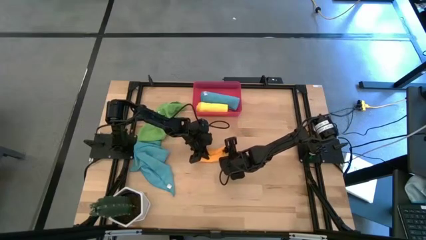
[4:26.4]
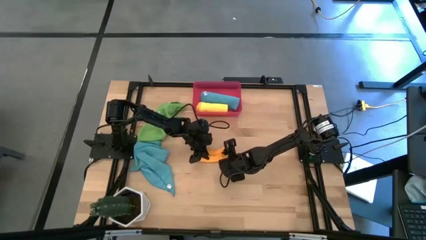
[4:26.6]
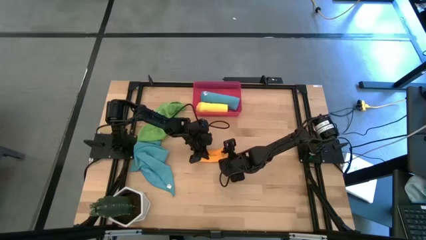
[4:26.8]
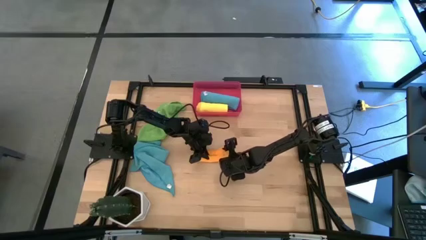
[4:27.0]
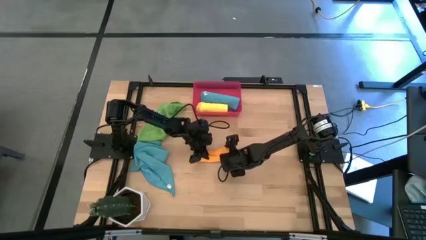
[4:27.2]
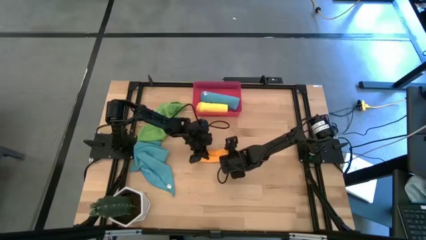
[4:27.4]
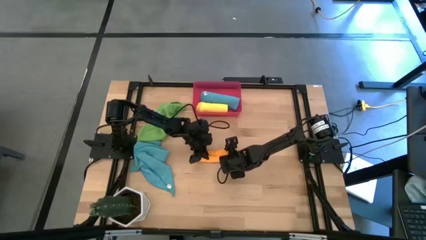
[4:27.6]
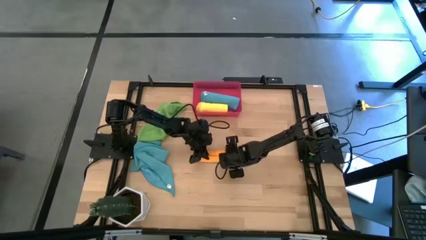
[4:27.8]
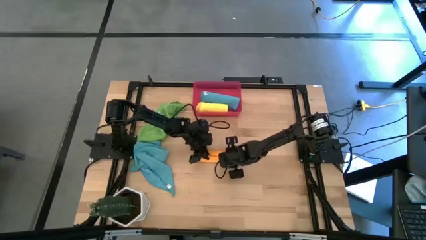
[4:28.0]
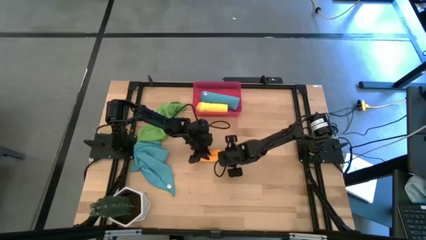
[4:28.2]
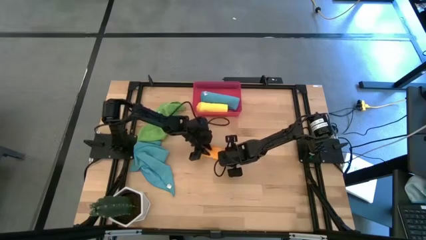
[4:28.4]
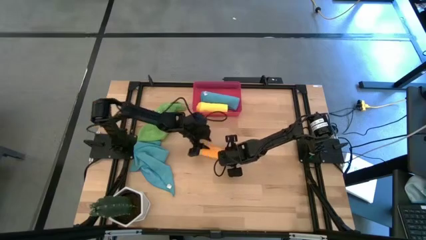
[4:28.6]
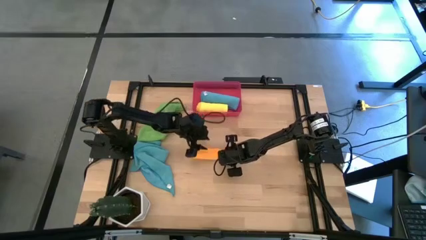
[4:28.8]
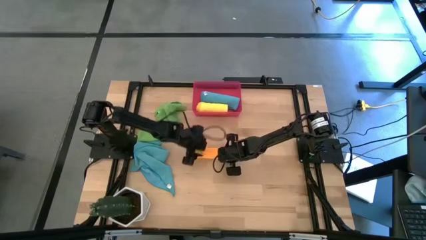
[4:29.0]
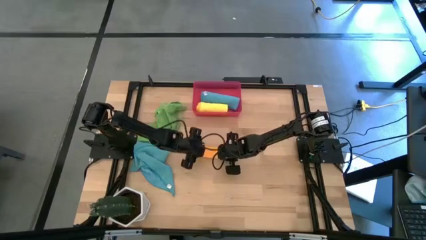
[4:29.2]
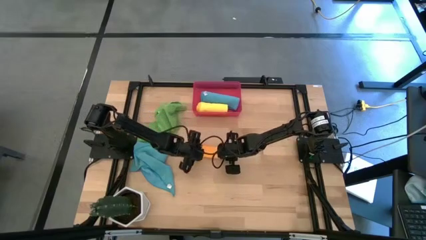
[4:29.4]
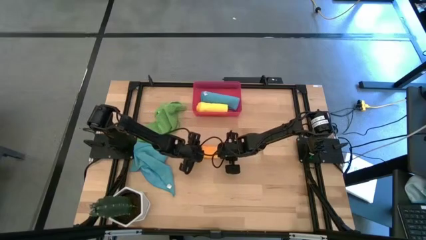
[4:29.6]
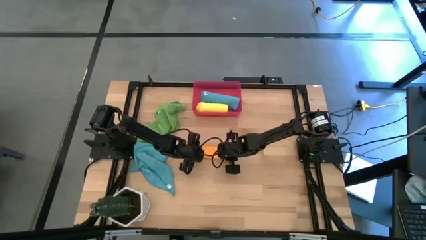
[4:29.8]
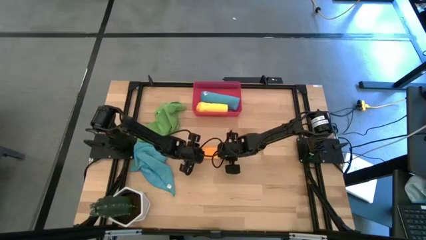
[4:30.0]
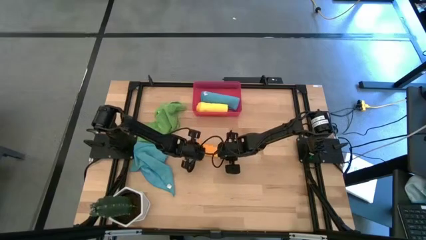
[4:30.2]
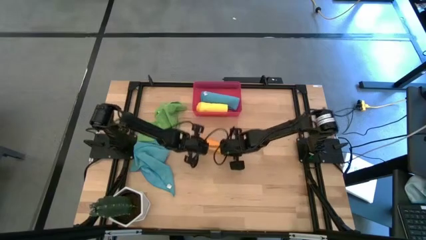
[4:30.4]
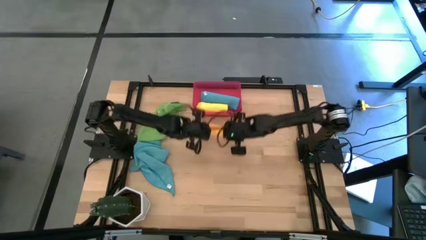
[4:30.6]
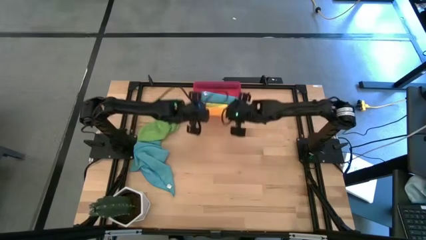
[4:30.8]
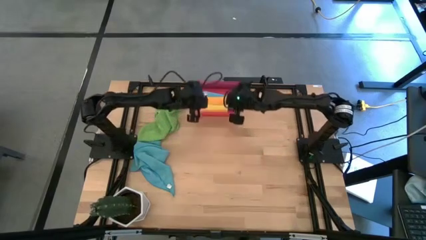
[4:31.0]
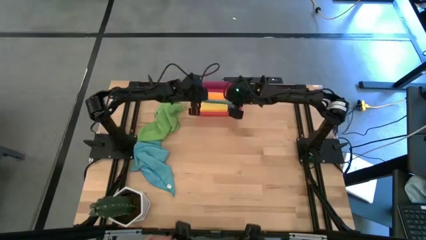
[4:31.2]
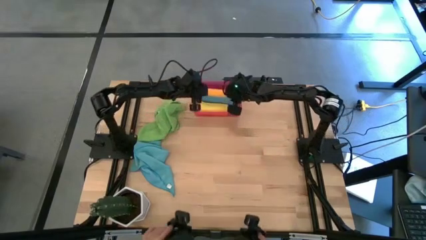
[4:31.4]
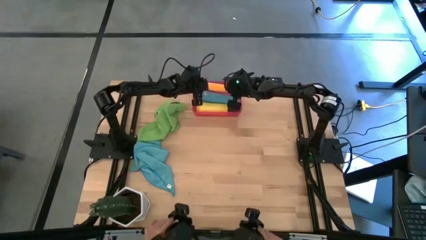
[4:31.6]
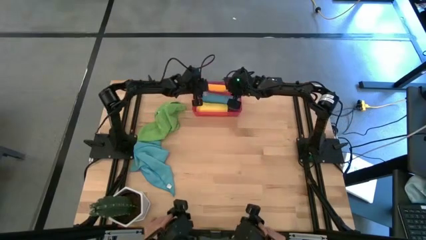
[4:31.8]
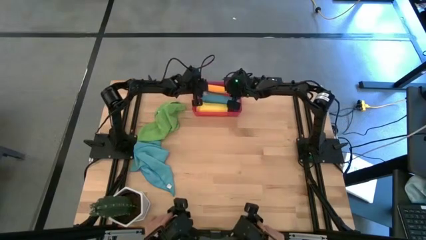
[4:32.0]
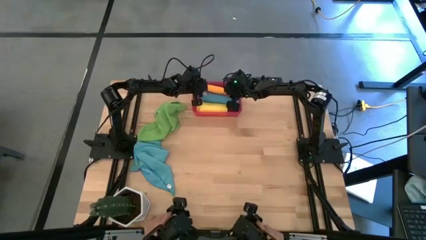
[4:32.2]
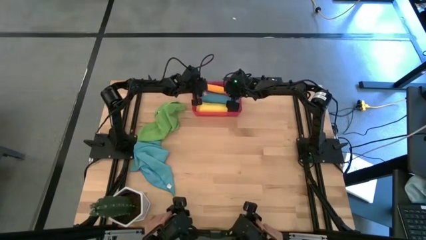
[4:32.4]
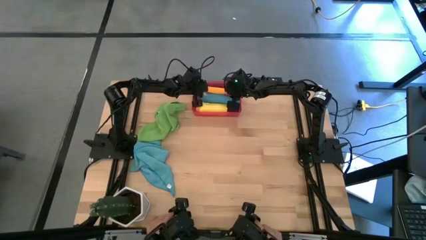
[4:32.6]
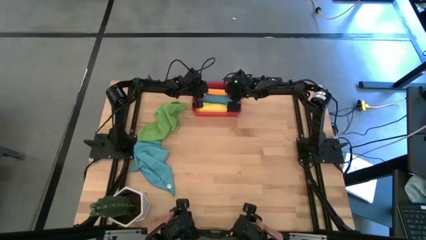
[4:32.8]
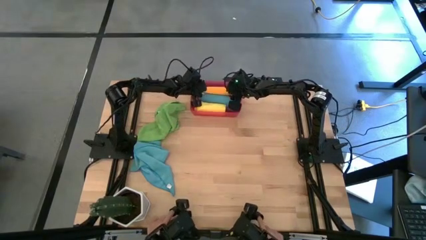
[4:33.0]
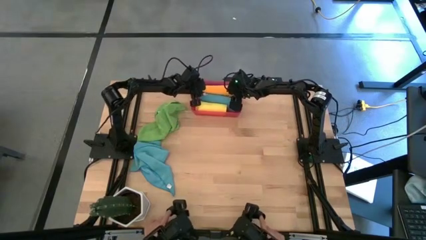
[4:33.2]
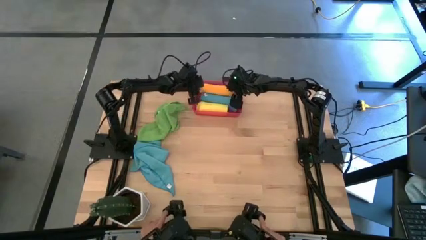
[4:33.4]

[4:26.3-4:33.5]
Task: Roll microfiber towels into tight, uniform cylinder then place into a basket
Put the orange microfiber cloth into the red bin

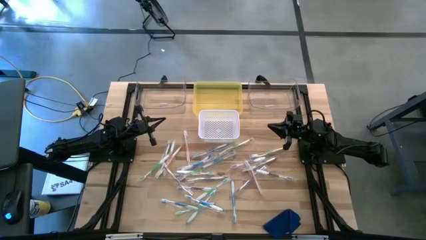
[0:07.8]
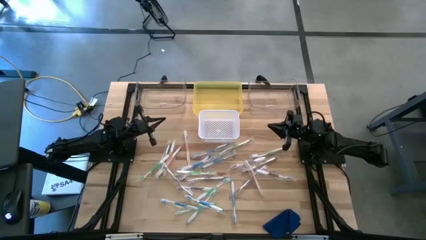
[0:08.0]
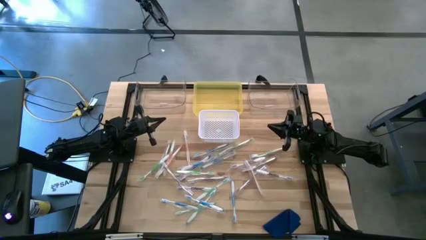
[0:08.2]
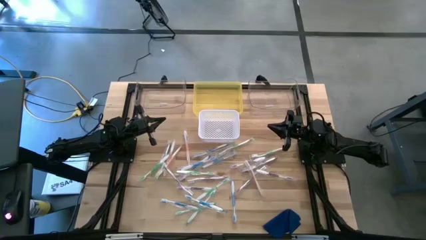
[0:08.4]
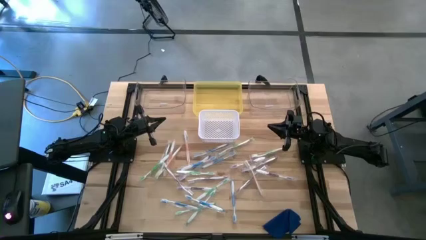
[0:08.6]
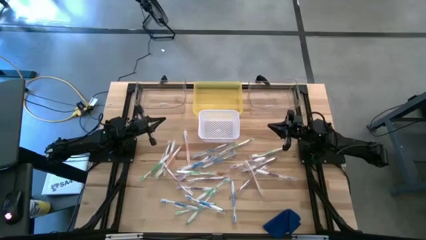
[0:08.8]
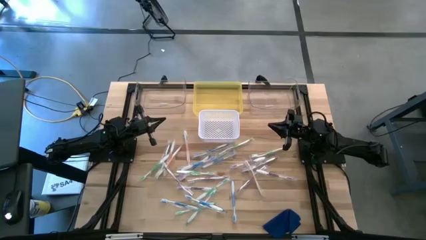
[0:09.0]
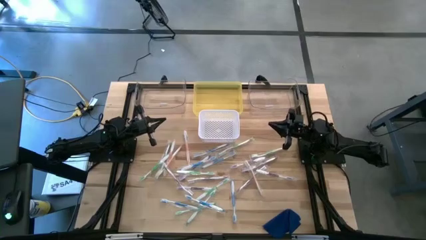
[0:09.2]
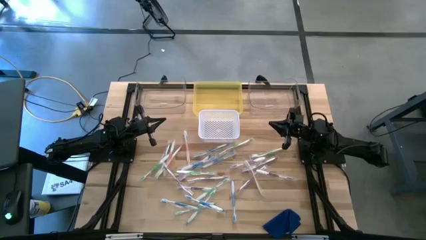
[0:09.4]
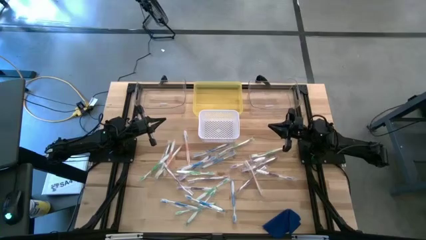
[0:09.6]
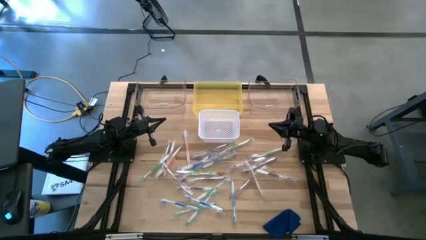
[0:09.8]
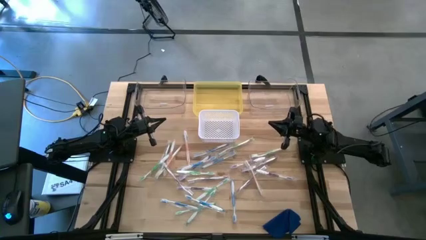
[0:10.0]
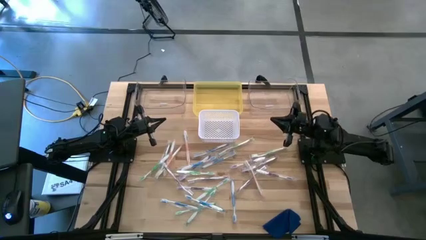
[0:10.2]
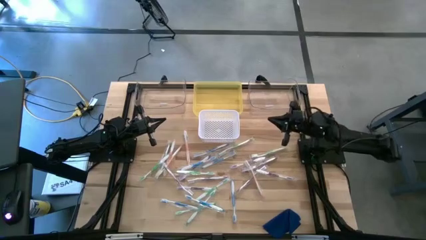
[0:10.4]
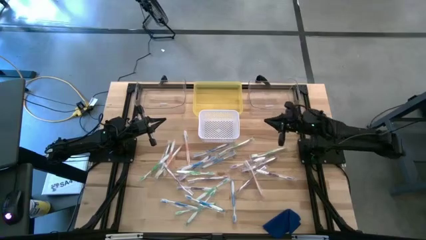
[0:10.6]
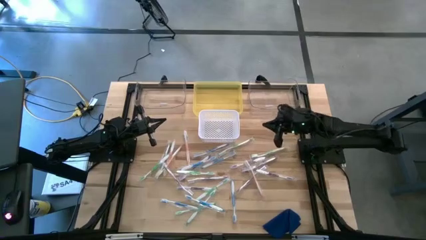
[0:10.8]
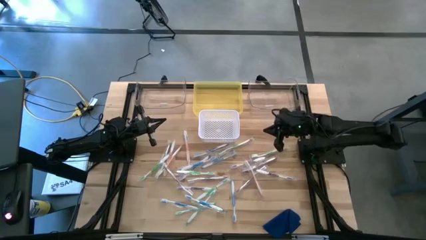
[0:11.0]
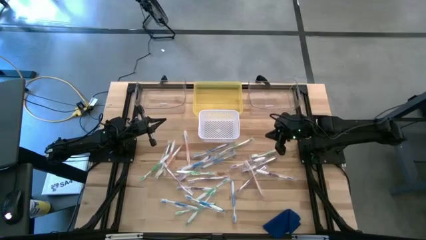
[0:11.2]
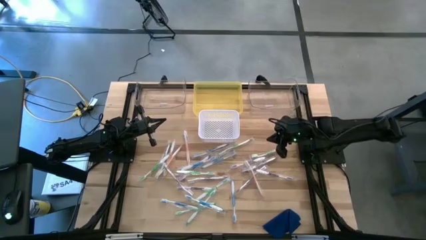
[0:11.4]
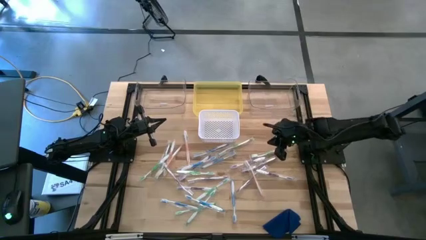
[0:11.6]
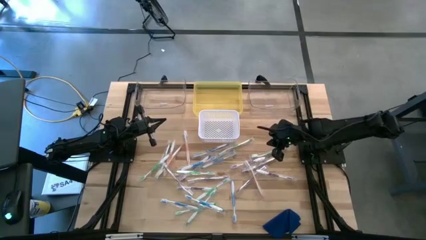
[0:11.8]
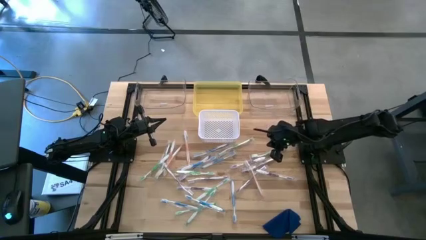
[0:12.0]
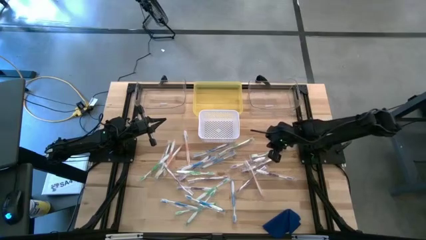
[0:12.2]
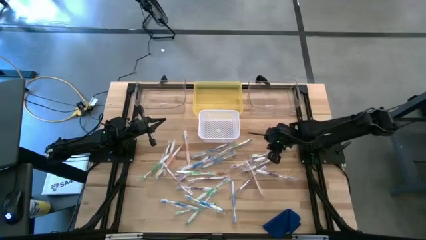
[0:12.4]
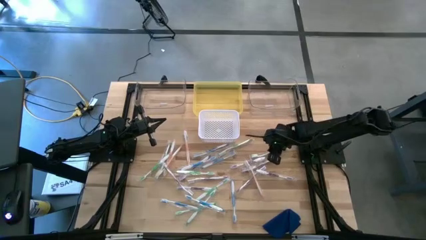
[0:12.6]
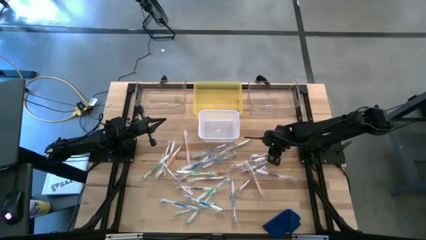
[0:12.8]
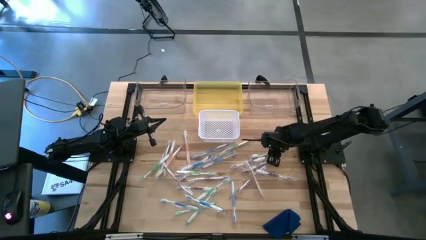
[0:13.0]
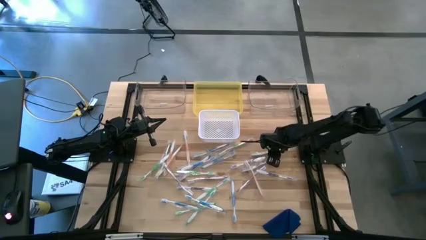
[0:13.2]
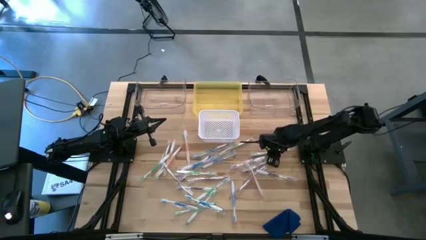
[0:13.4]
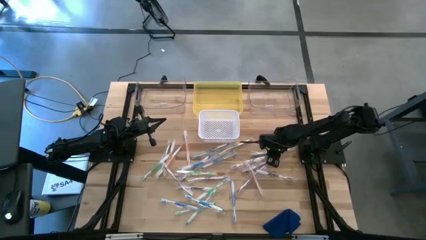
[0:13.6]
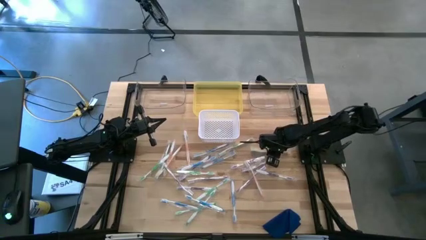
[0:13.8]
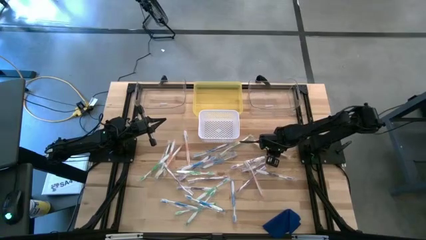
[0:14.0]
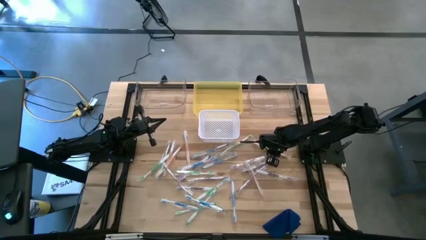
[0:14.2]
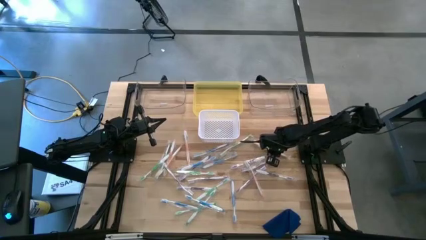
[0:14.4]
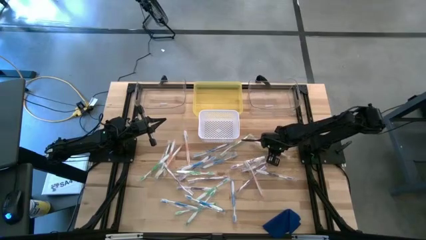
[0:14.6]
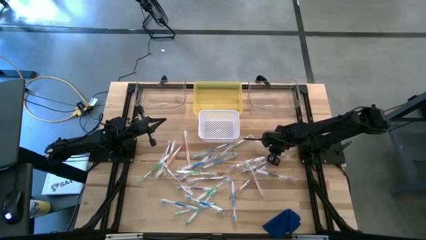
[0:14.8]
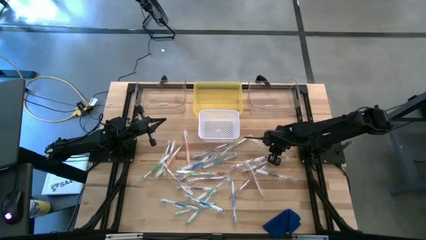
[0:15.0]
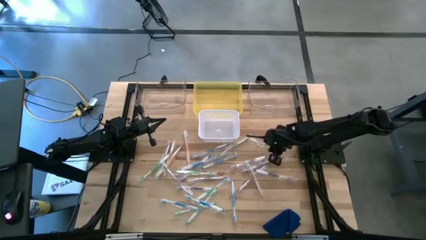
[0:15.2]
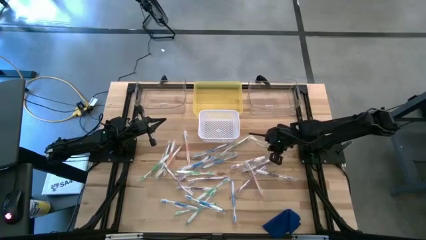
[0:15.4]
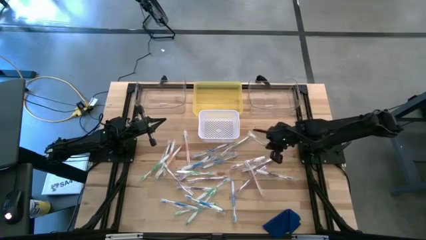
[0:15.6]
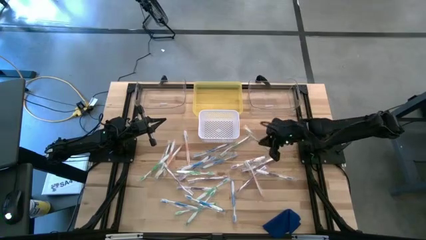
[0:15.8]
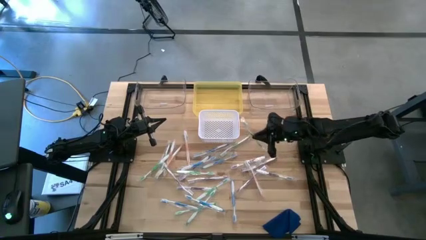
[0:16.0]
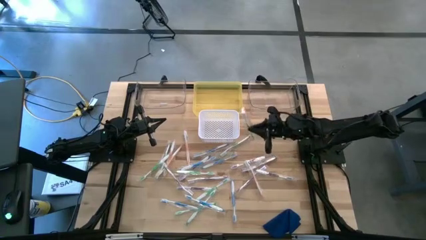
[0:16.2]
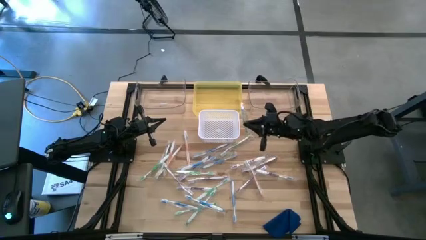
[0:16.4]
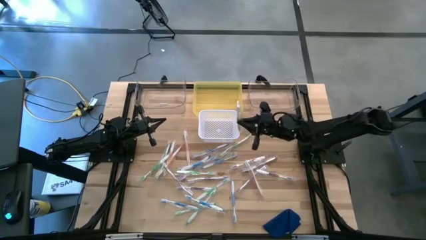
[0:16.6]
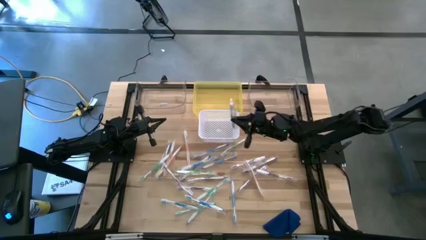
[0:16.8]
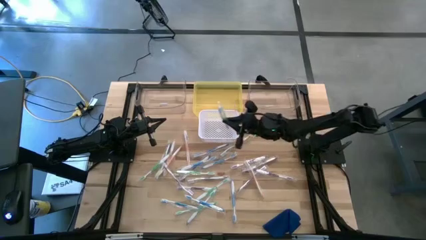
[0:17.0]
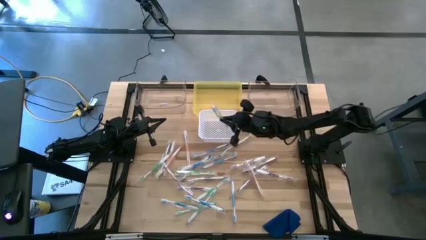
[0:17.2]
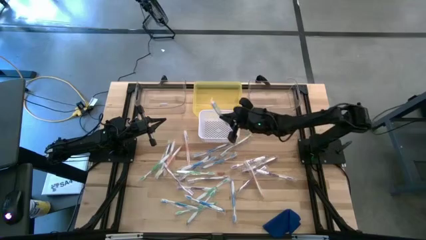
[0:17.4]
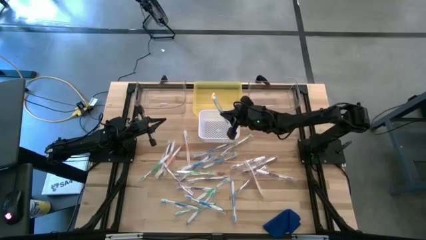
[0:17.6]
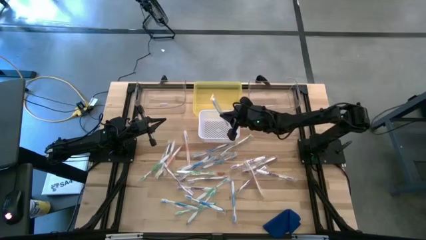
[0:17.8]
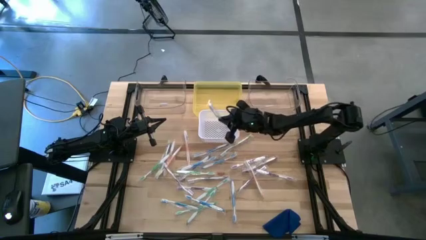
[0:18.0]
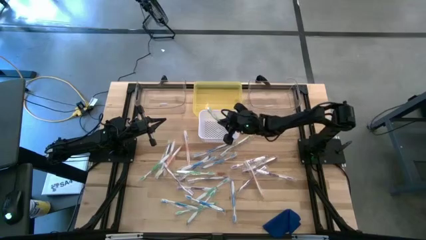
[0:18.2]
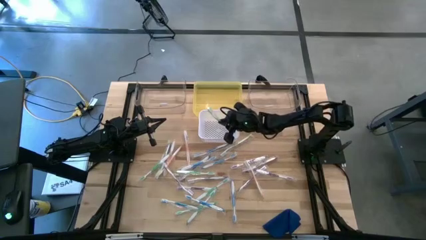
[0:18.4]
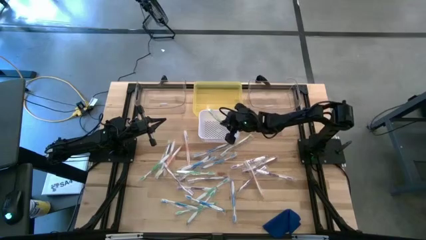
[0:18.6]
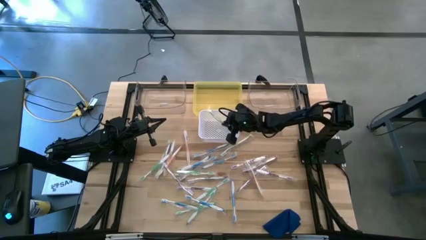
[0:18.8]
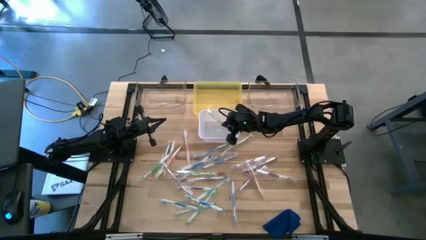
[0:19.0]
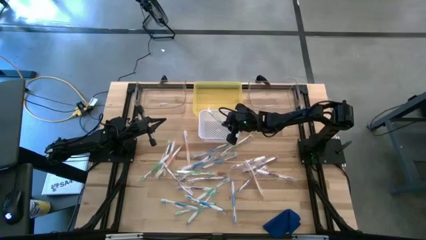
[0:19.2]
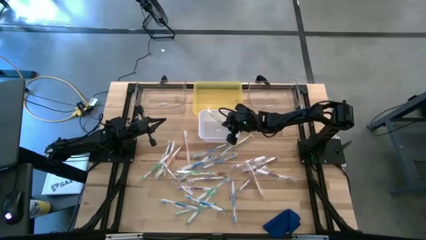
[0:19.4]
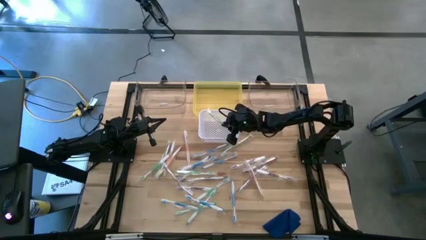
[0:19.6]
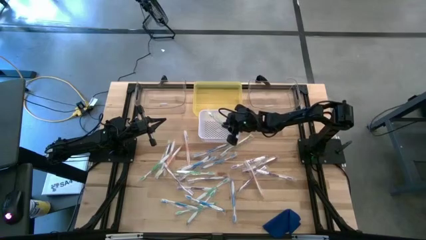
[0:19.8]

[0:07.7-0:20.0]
Task: Pick & Place Toothbrushes
Put the green toothbrush into the white bin
